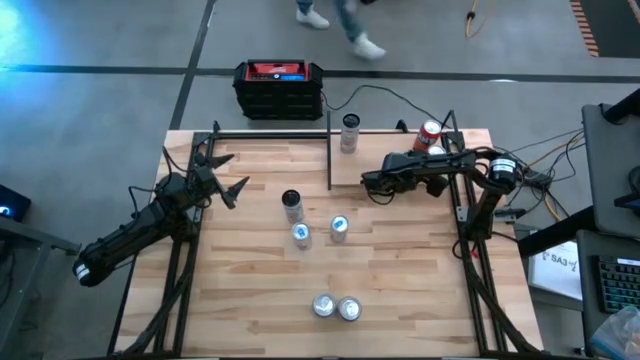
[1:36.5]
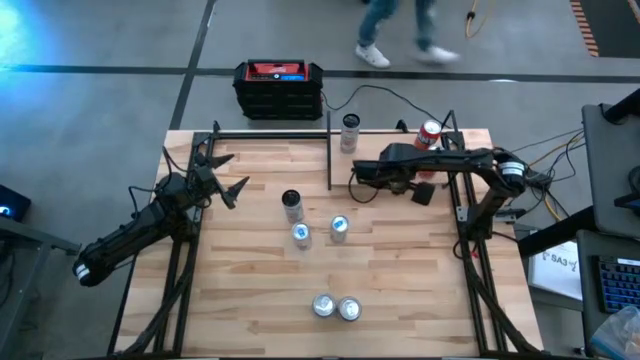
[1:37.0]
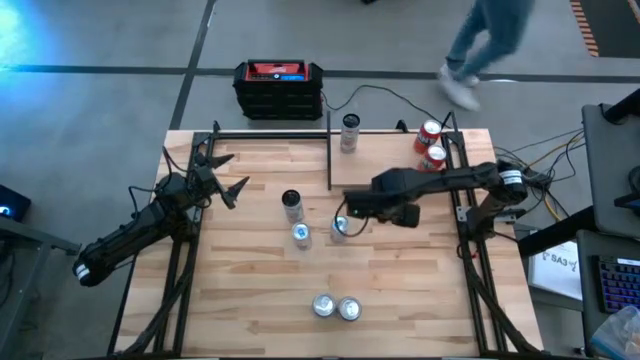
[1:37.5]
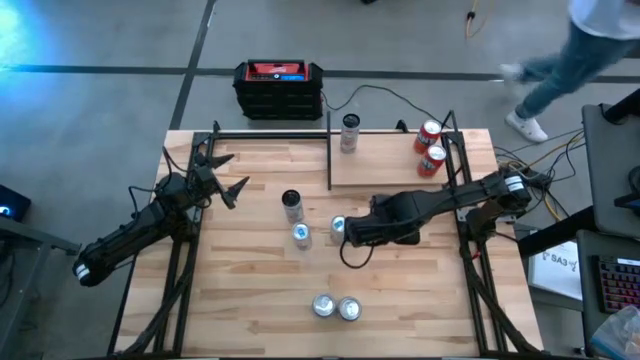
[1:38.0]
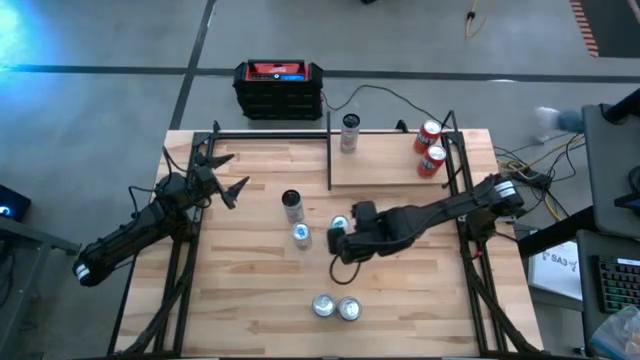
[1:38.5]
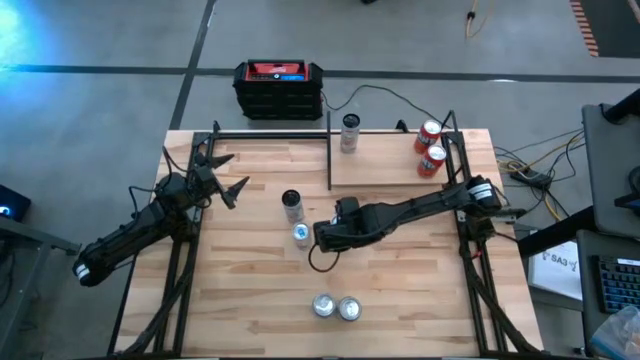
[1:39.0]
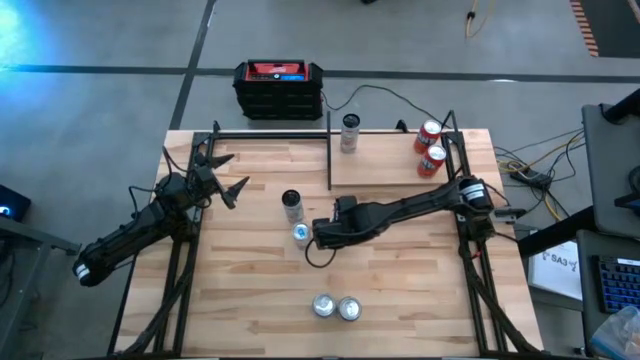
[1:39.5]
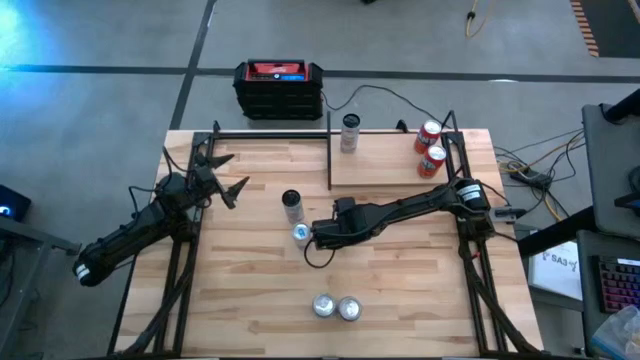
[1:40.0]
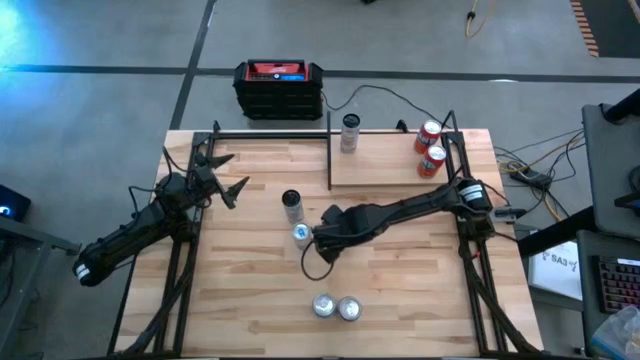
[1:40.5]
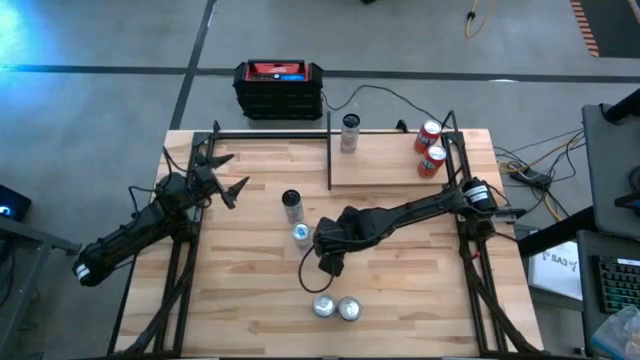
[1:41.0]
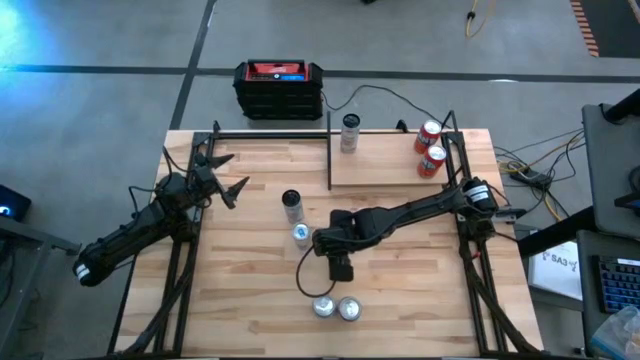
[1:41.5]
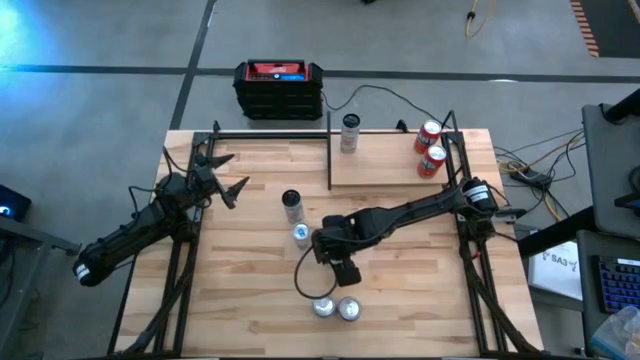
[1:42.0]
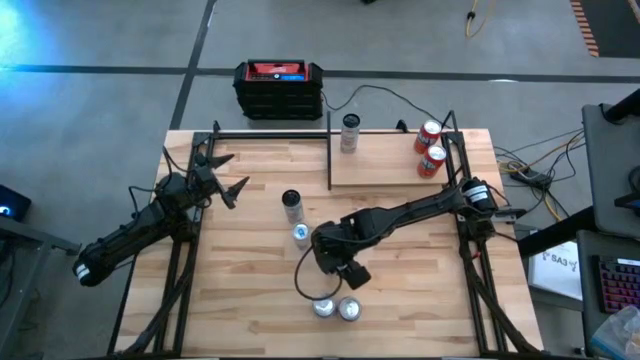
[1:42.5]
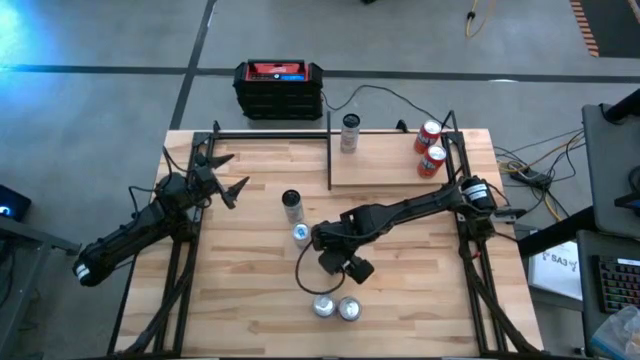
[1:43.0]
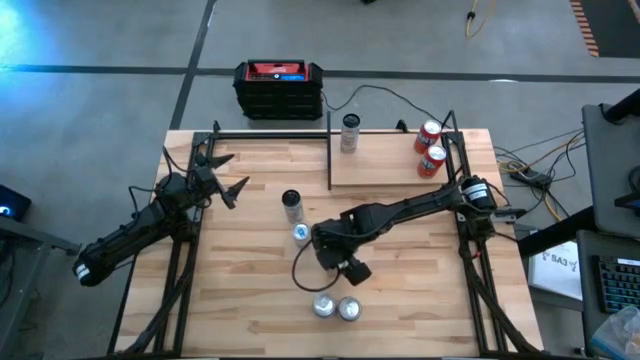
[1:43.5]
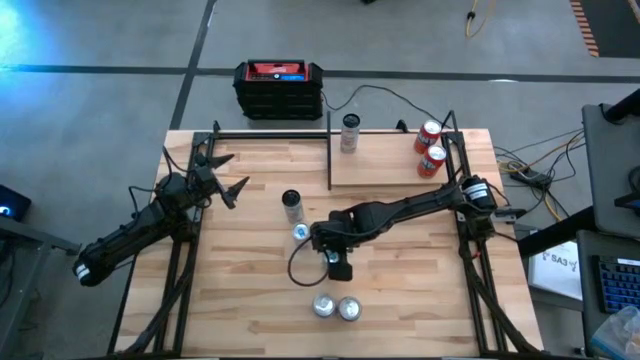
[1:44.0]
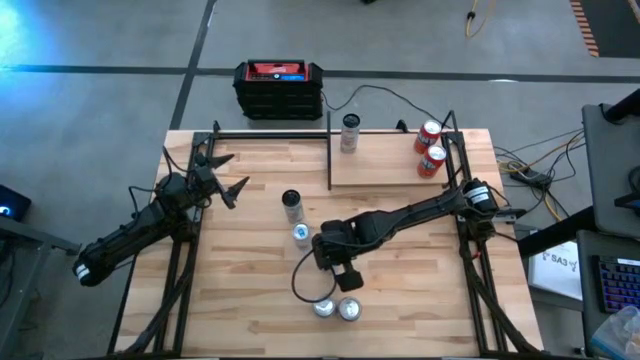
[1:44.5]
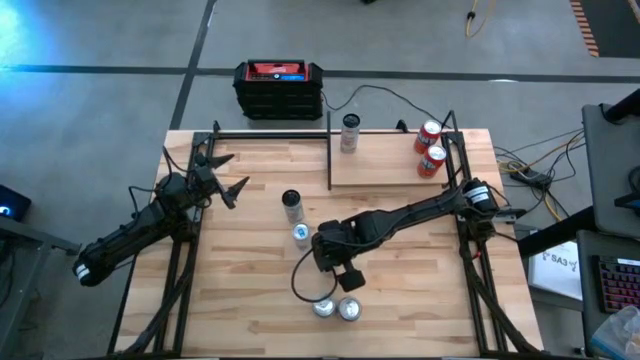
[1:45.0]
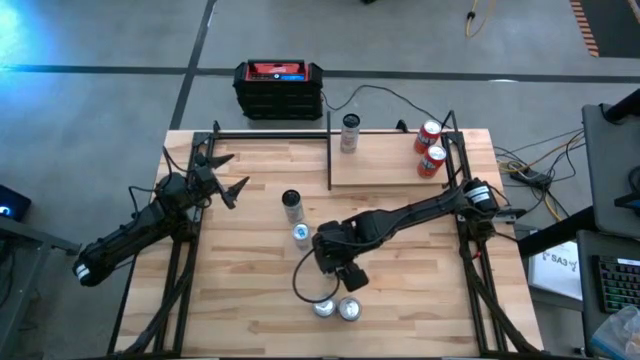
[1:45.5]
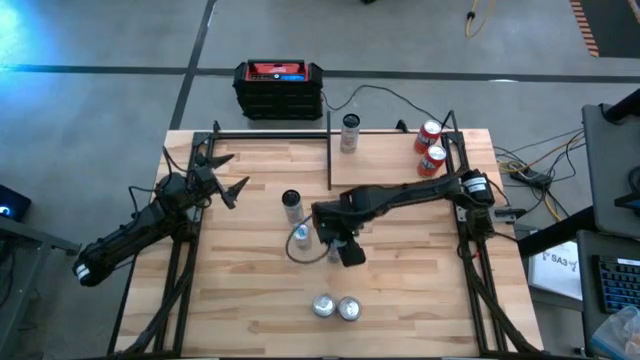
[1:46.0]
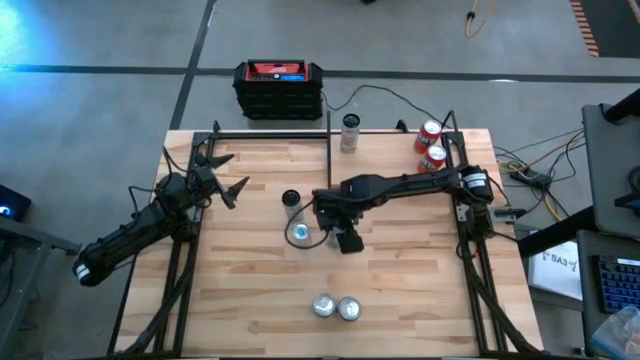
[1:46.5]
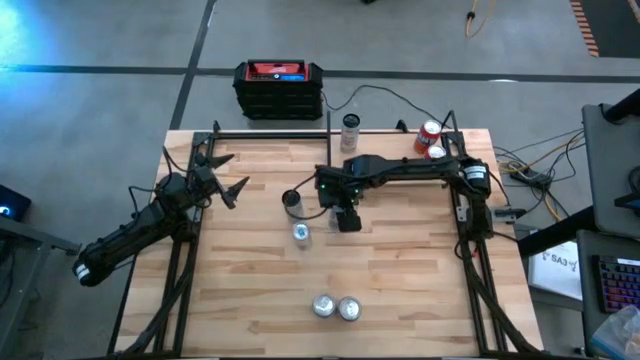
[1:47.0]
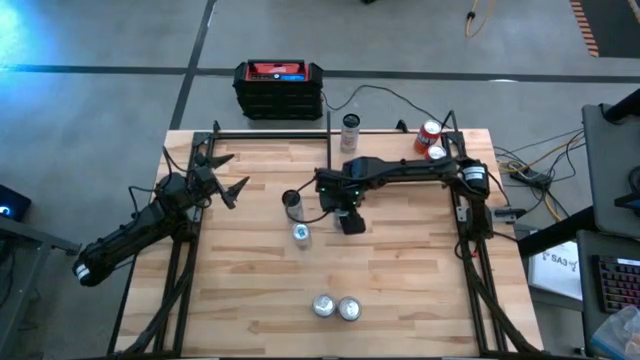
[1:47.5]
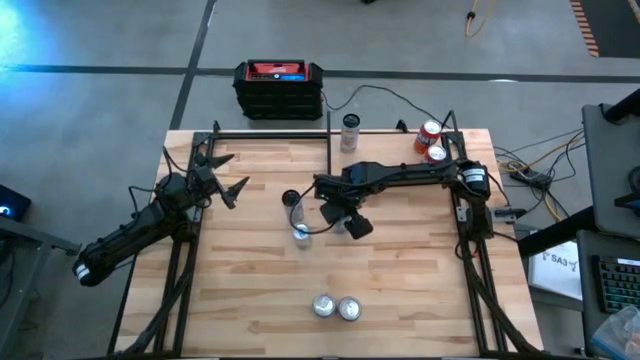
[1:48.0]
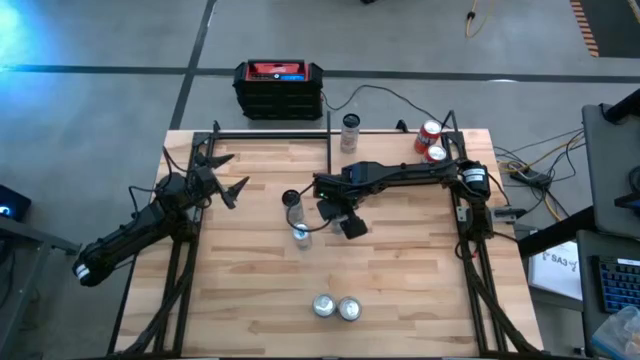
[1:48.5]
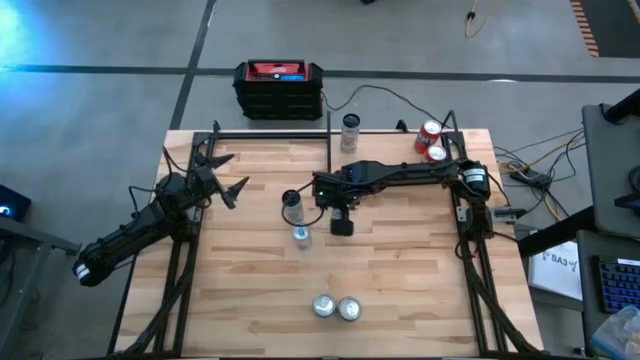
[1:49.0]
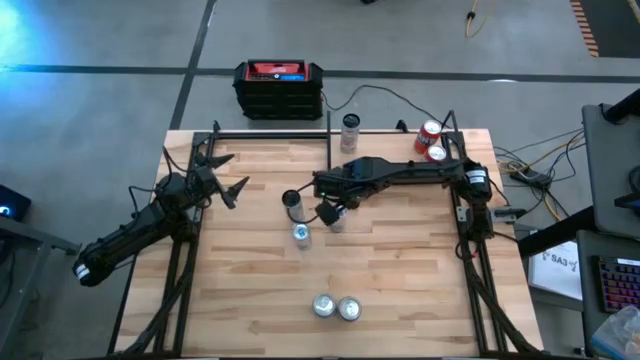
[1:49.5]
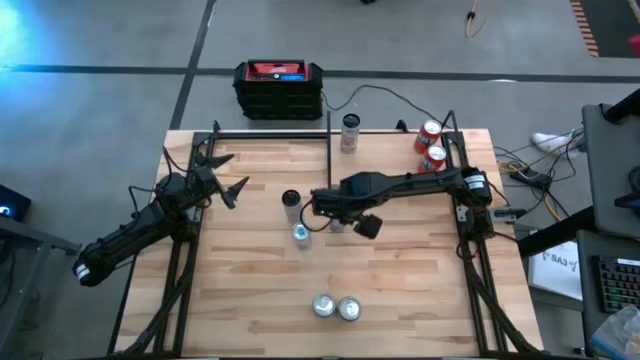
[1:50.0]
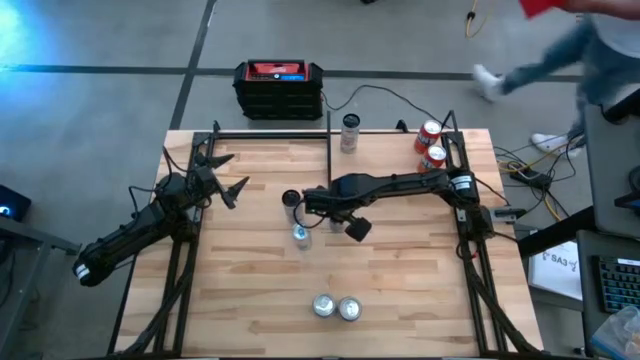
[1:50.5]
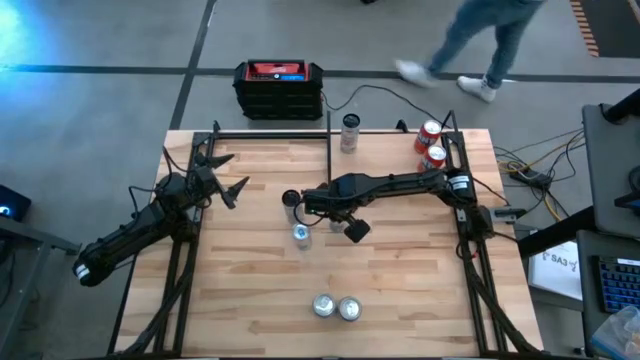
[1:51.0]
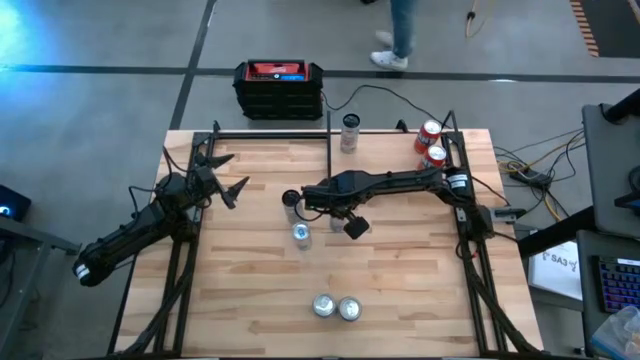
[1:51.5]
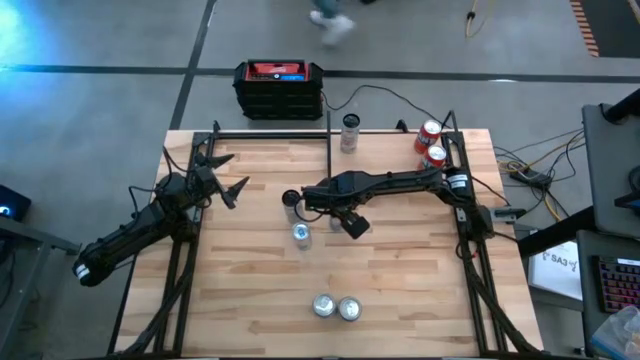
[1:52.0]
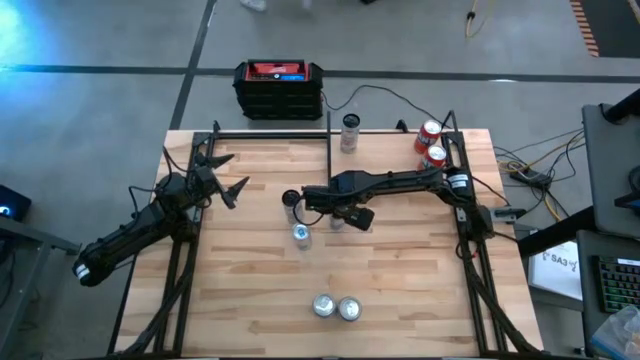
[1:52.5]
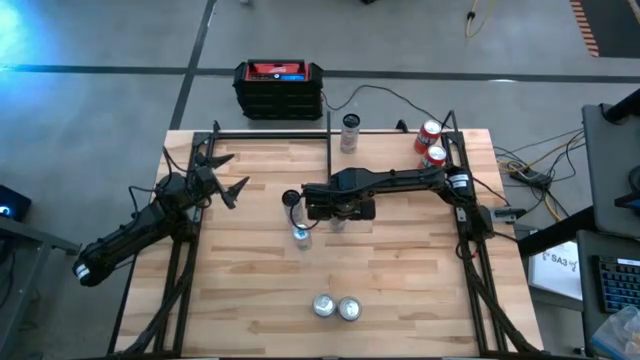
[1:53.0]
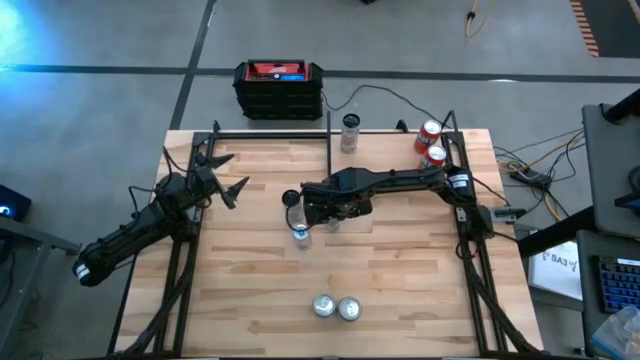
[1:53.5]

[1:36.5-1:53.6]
Task: Place canned beverage on shelf
Put the right blue soda can on the shelf

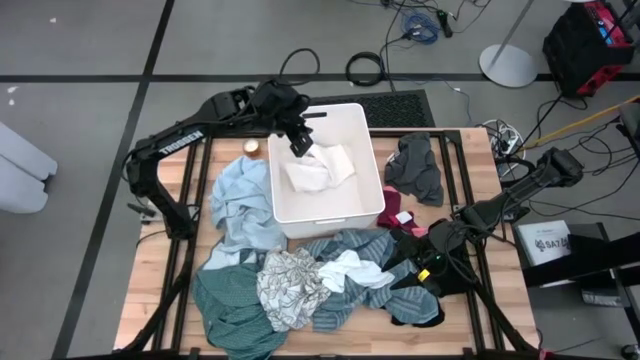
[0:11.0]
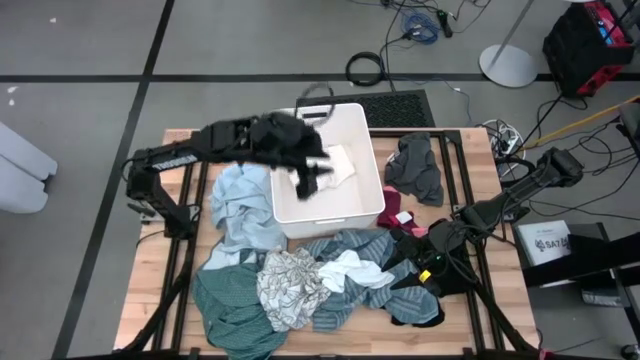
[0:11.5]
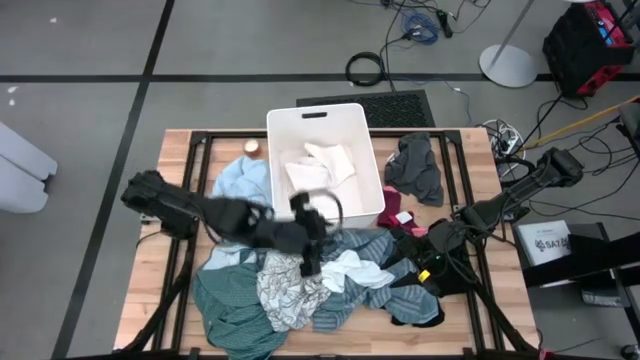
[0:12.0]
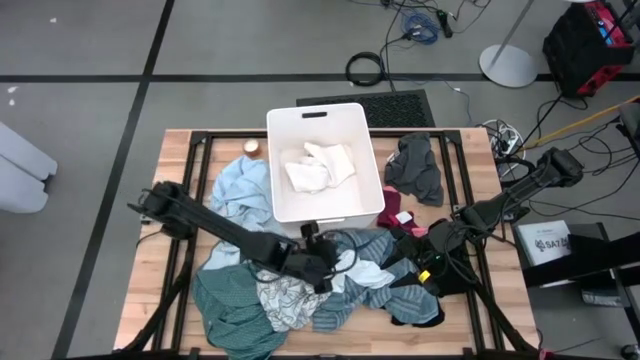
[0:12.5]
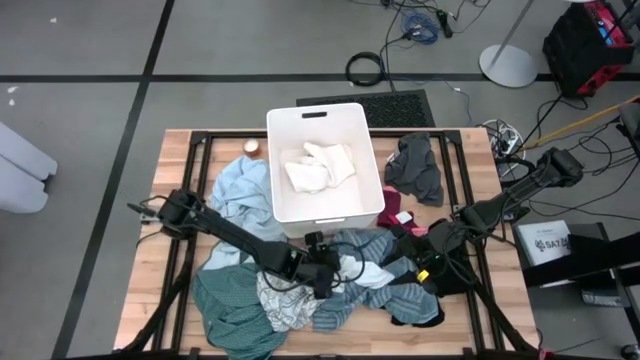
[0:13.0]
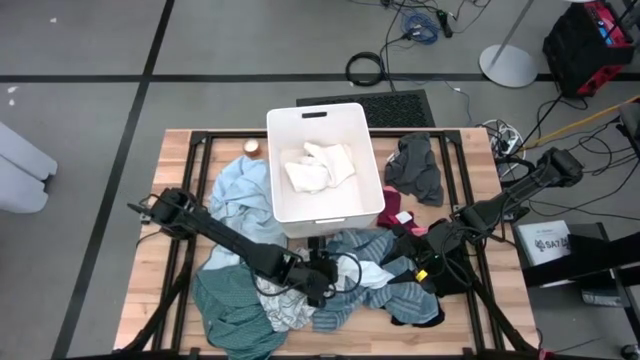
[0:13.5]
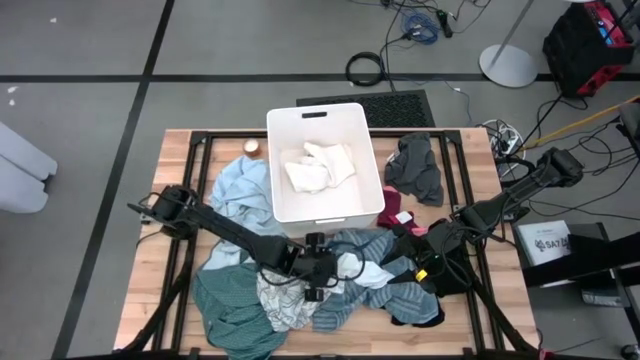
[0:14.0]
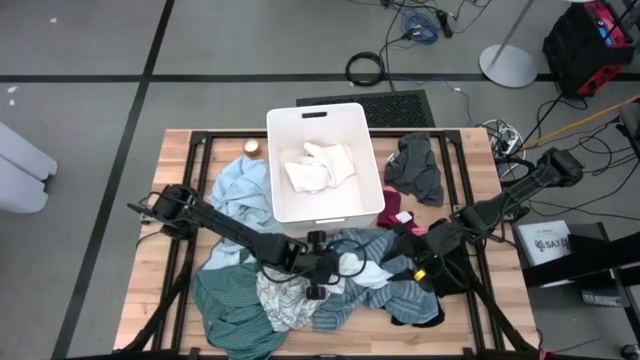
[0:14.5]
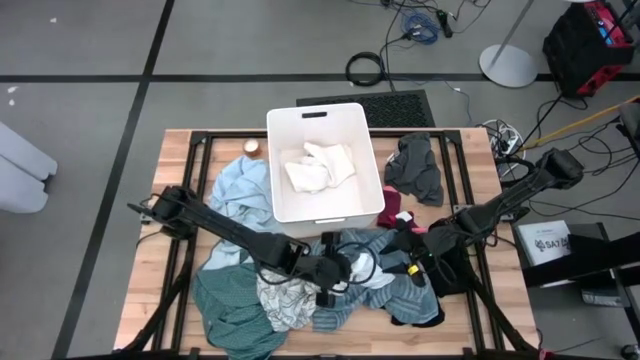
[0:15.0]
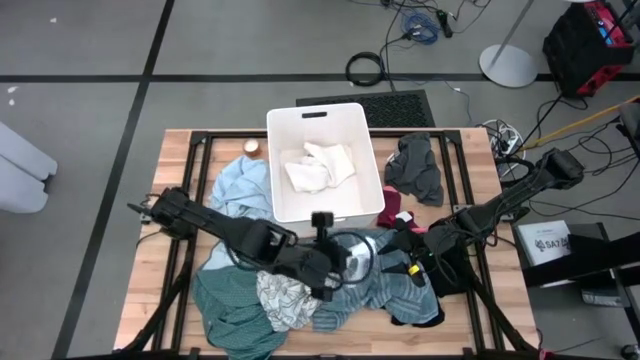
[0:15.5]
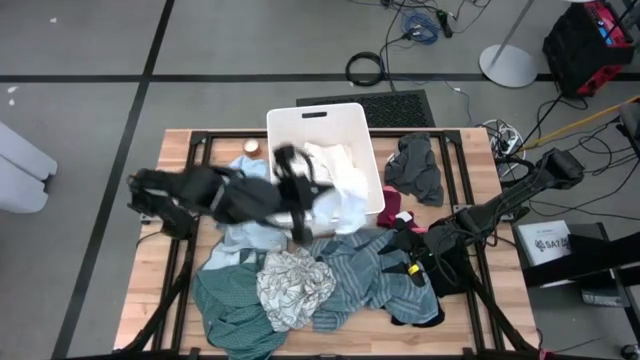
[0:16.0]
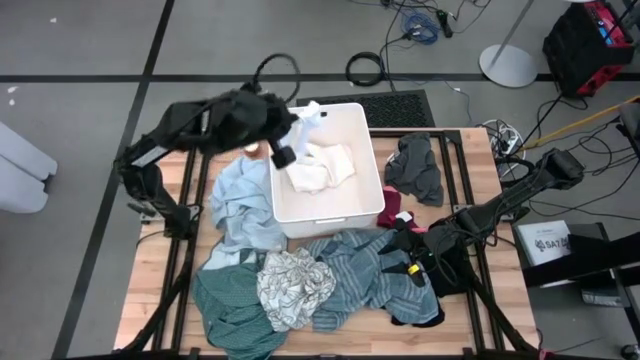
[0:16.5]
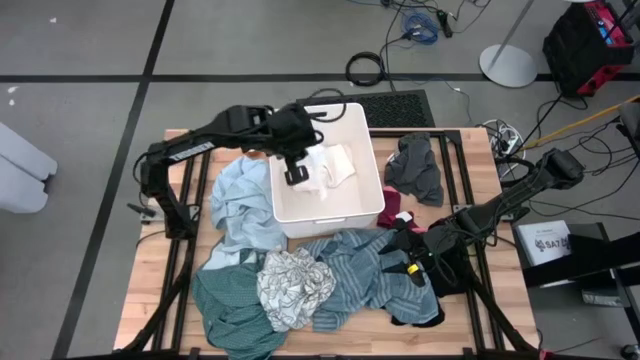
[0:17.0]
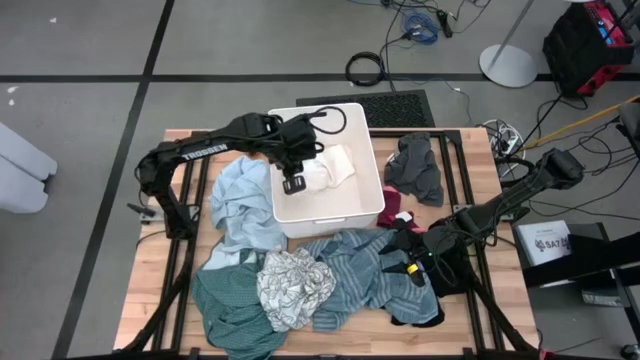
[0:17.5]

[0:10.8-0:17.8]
Task: Sort clothes
Put the white sock into the white laundry bin
